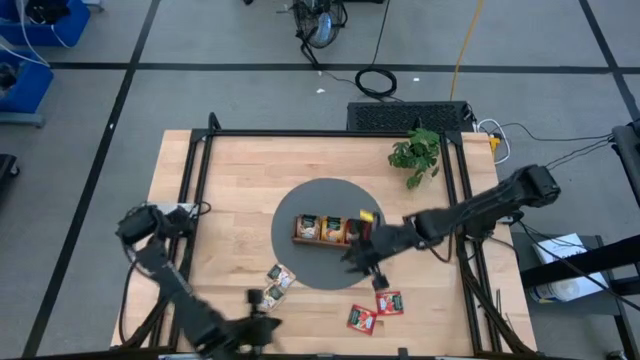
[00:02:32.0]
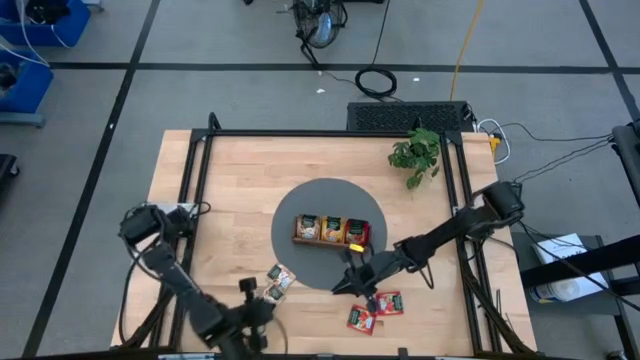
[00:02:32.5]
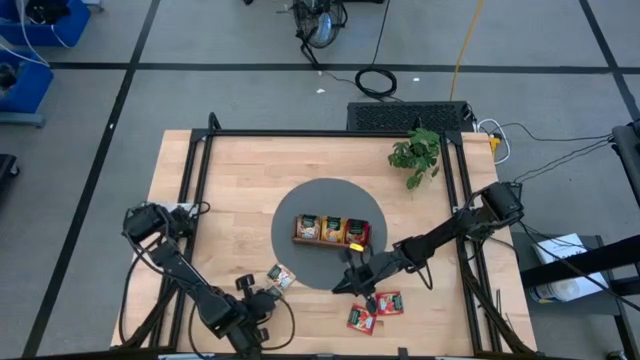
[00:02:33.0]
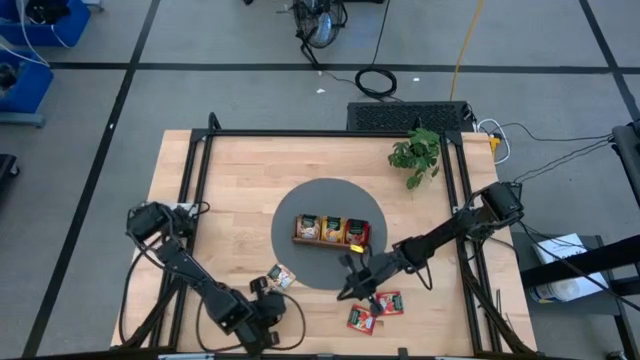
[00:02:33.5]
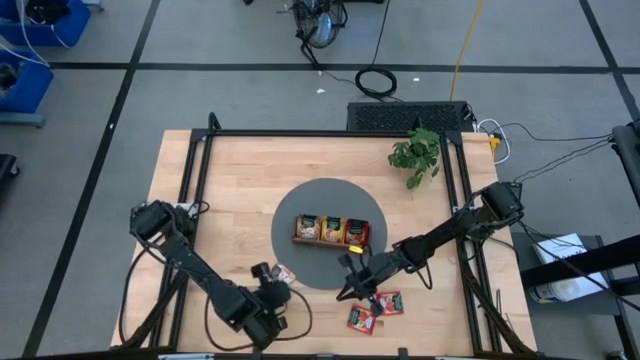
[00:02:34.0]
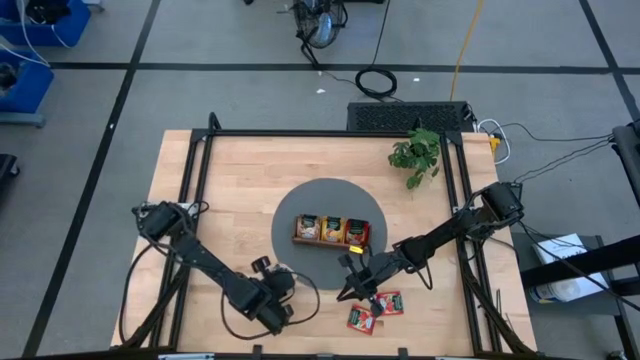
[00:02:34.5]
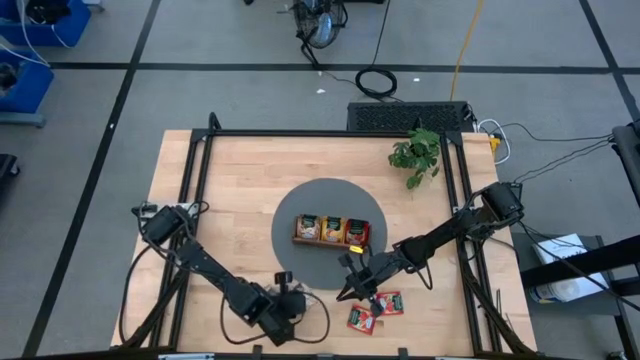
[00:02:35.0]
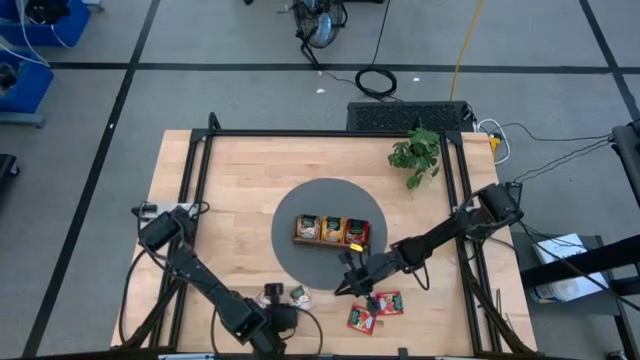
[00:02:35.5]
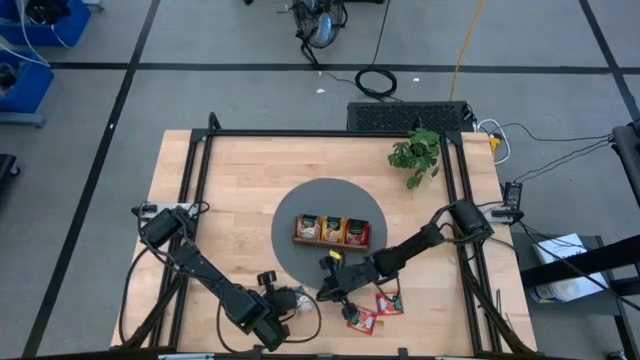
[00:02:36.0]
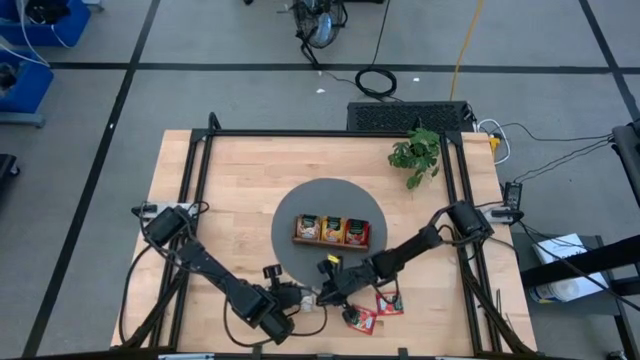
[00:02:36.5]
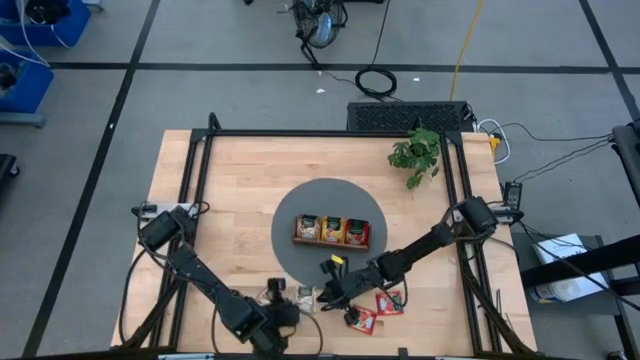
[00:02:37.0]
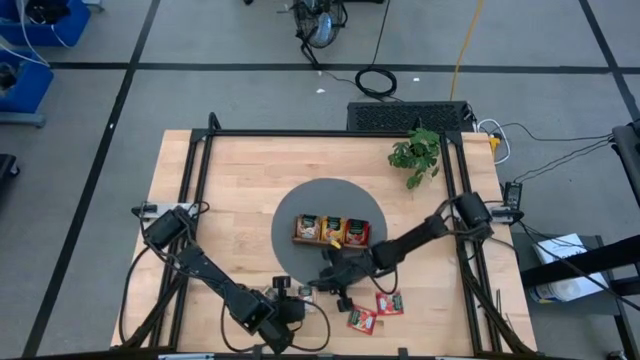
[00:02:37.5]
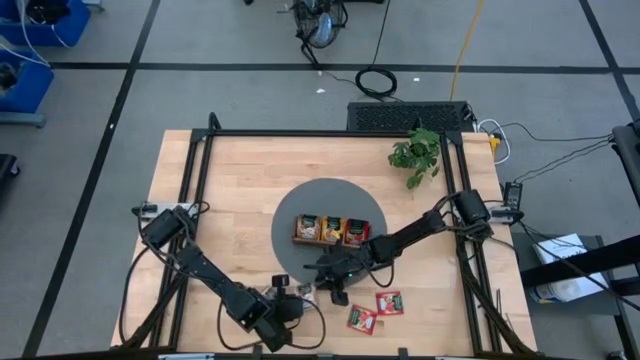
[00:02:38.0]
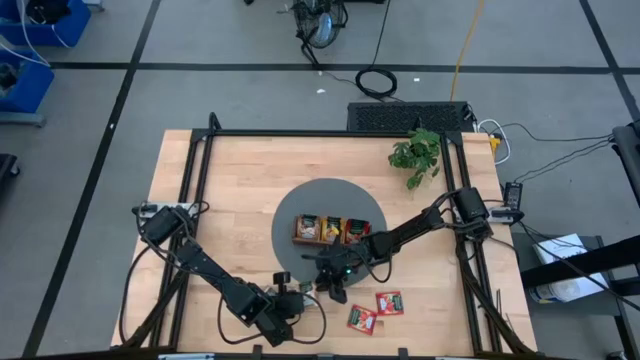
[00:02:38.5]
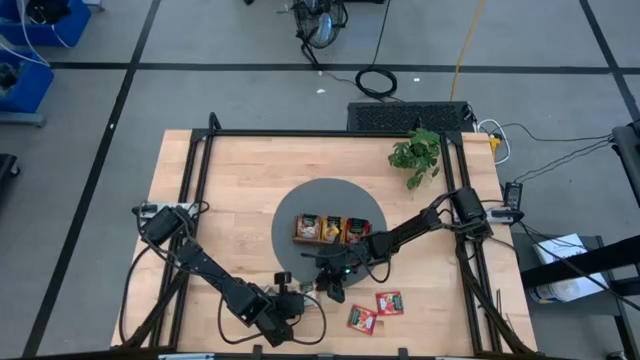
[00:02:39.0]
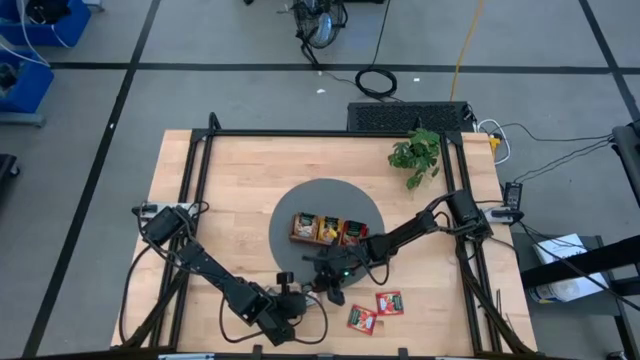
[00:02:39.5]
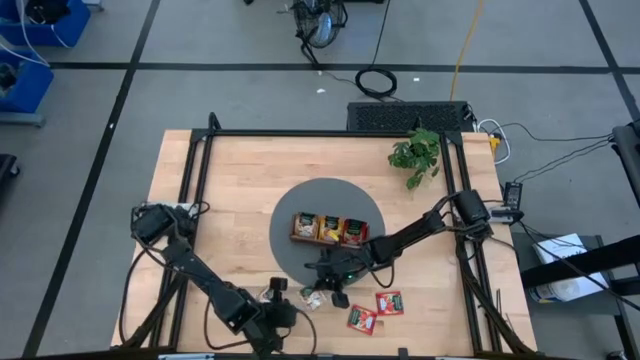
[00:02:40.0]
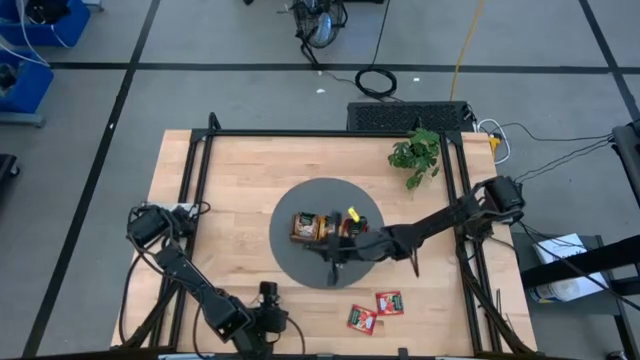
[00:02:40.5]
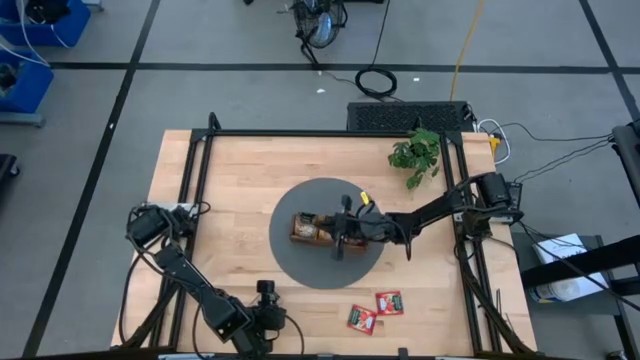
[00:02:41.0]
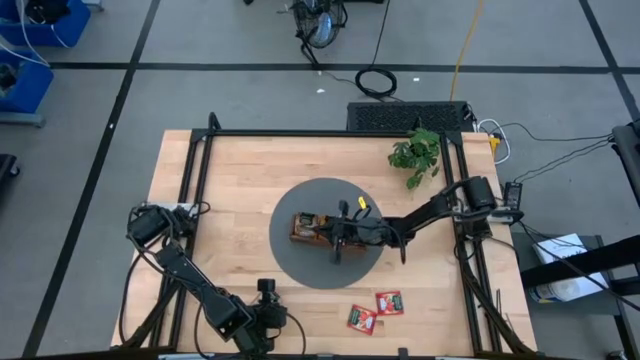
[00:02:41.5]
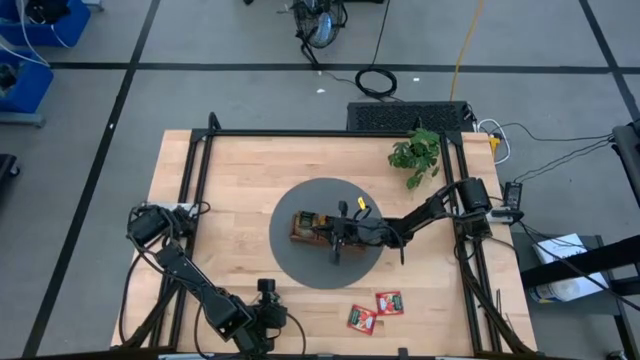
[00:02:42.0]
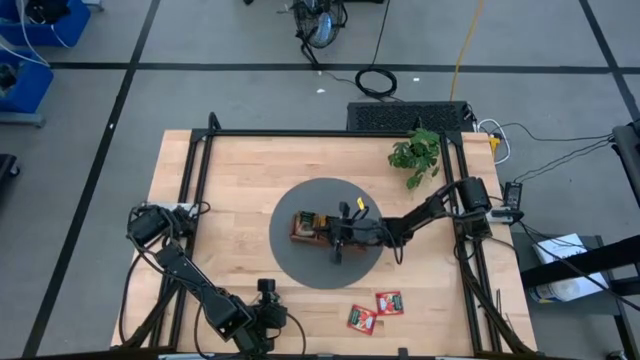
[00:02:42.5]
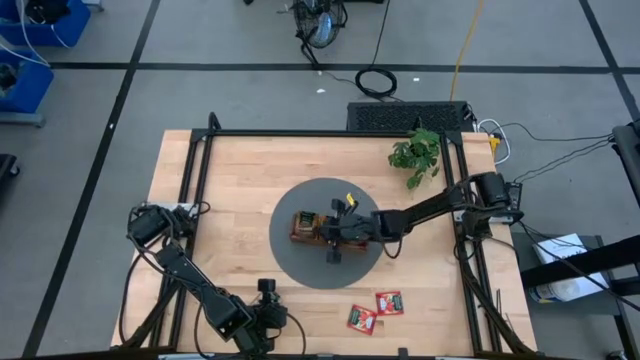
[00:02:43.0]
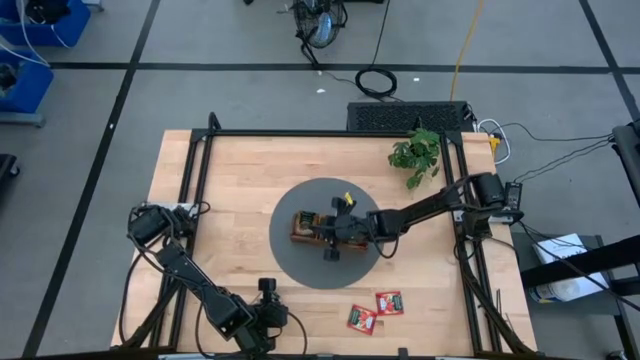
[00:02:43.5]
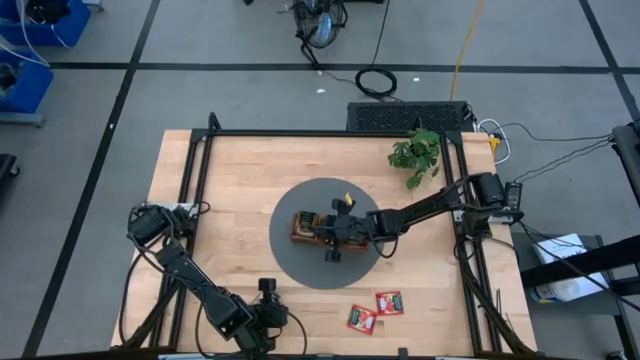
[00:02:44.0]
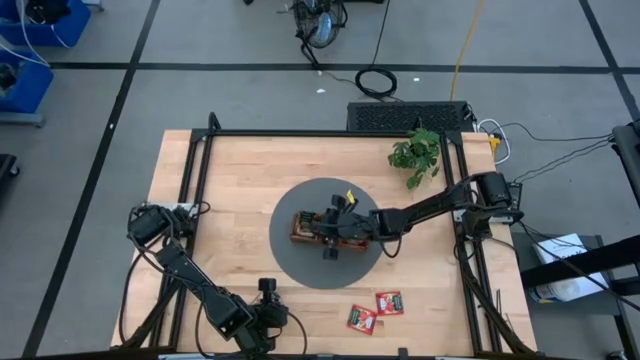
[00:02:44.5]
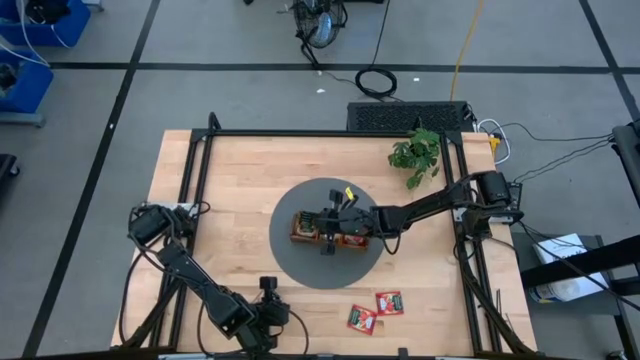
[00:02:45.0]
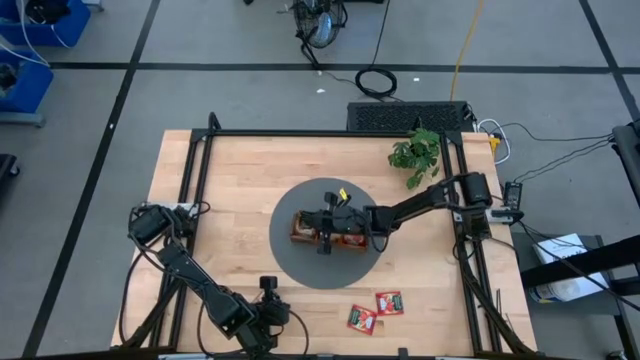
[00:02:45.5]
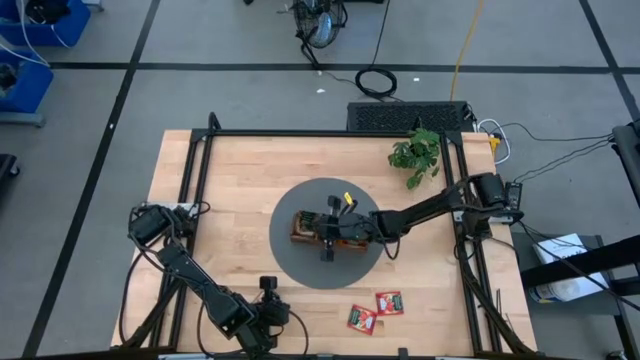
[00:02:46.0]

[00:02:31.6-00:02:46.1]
Task: Pick & Place Tea
Put the brown tea bag into the left section of the wooden organizer

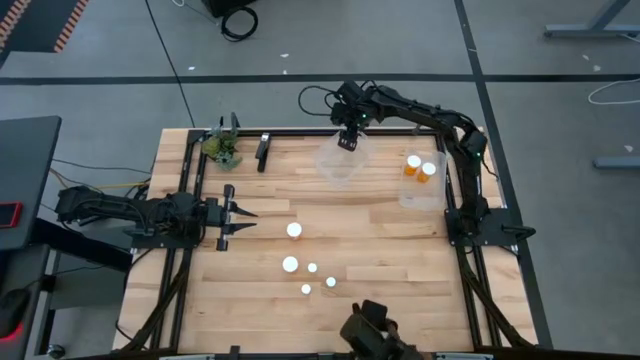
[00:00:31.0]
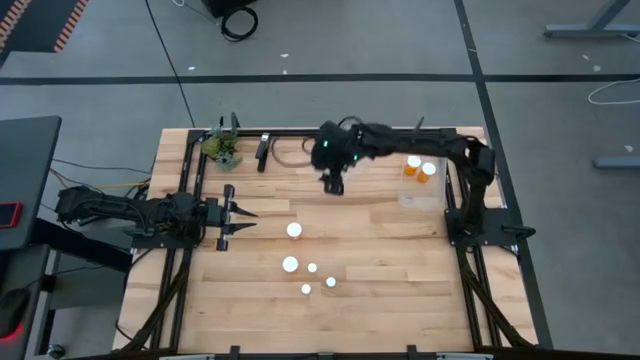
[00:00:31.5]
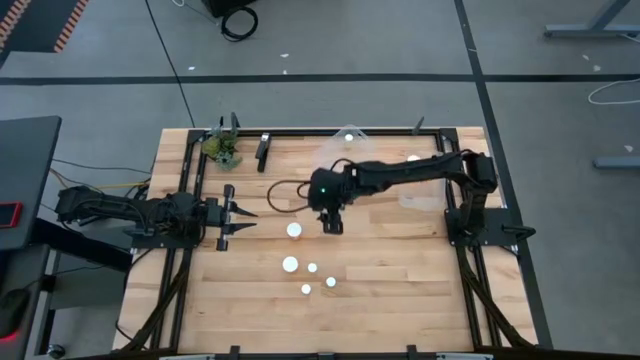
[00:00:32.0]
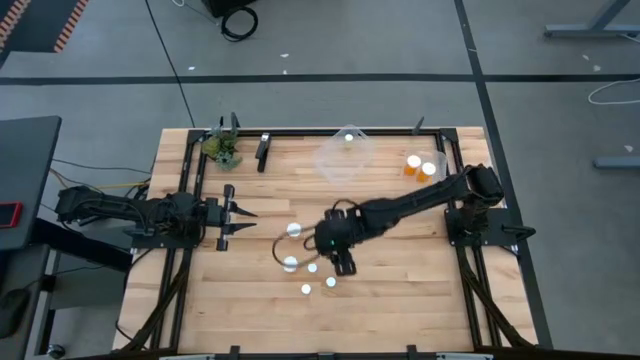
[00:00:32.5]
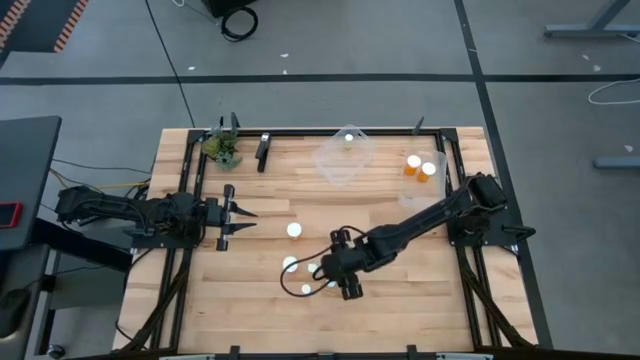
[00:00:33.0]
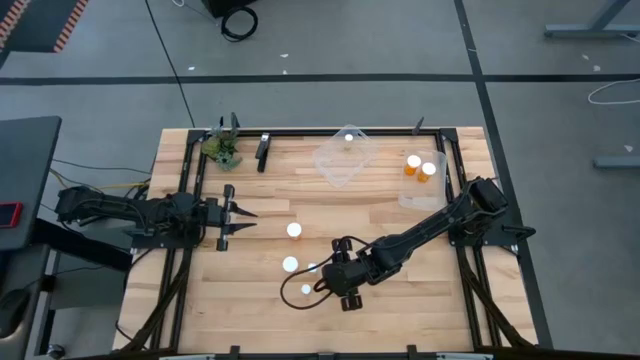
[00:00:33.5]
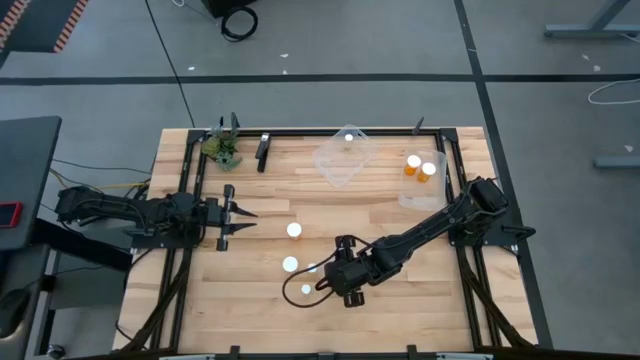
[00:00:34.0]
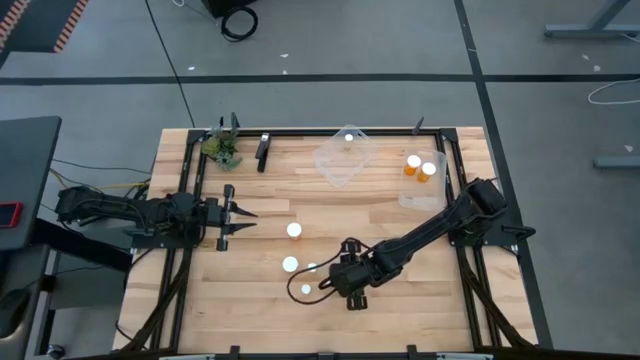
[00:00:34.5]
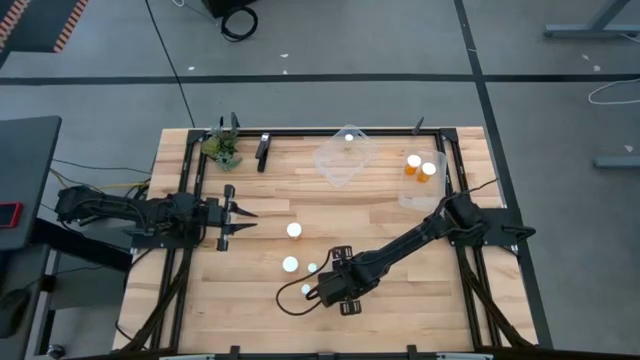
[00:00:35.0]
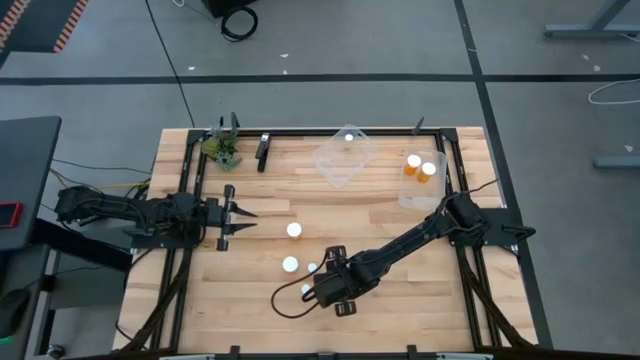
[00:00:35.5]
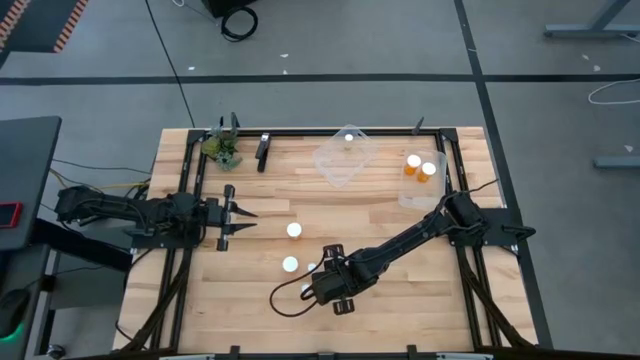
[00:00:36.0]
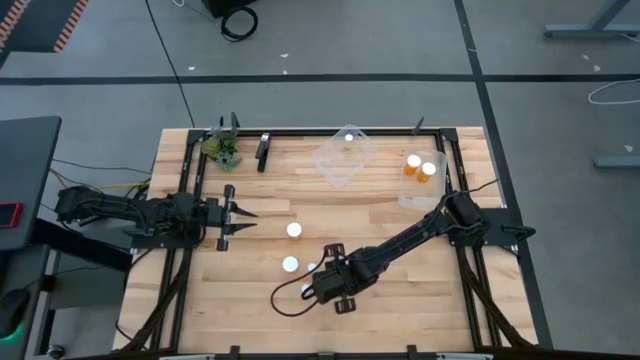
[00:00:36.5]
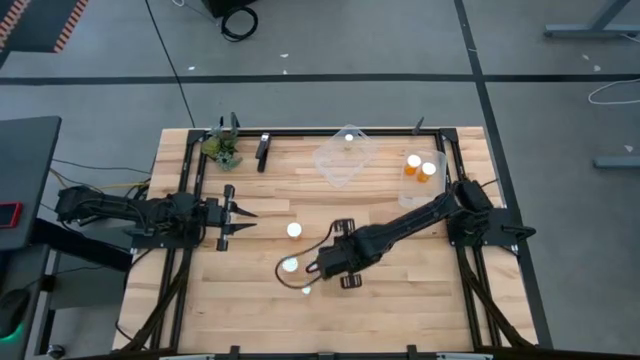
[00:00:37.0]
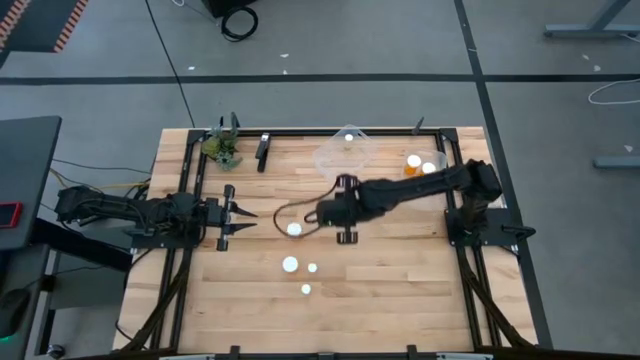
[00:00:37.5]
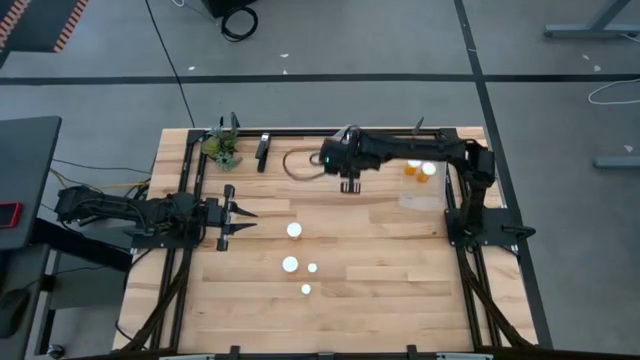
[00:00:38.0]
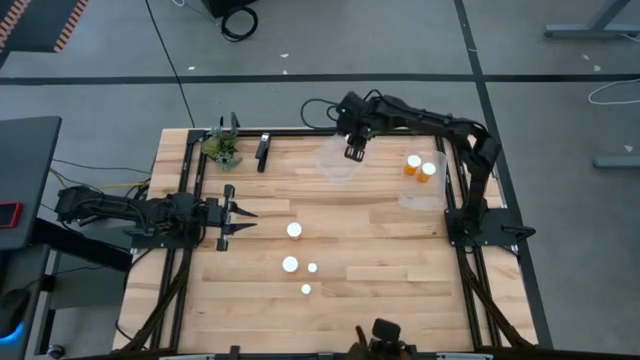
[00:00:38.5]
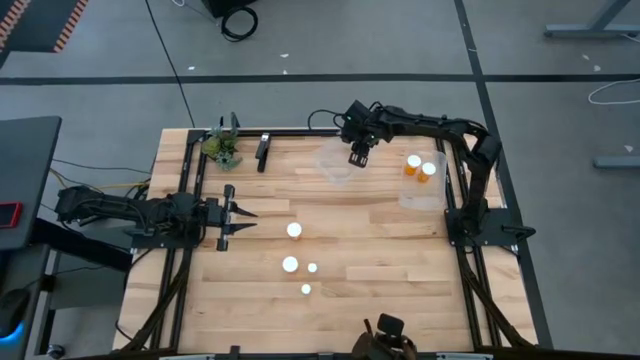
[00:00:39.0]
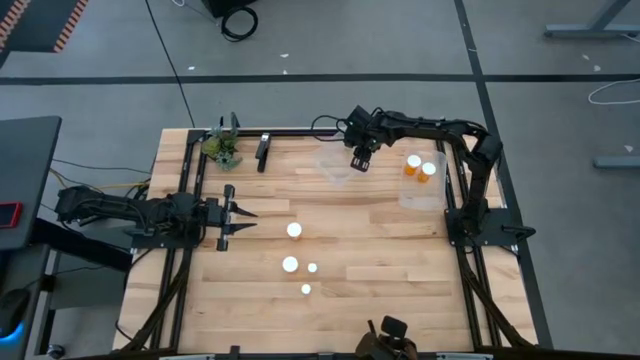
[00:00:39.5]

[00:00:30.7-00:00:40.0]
Task: Pick and place medicine bottles into bin by pill shape (circle, oval)
Put the small yellow pill bottle into the left transparent bin
